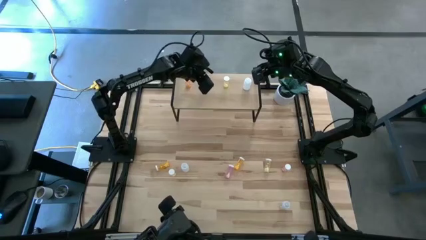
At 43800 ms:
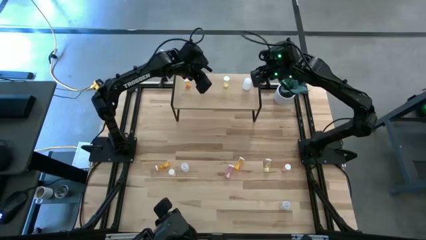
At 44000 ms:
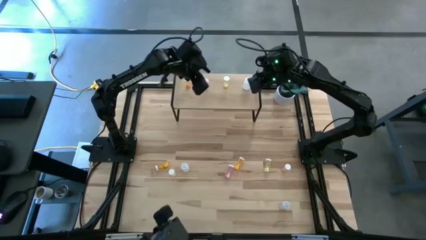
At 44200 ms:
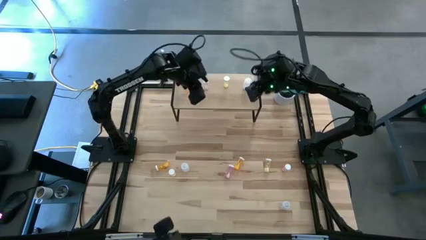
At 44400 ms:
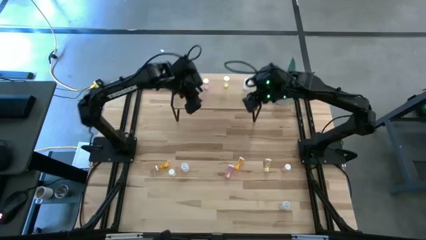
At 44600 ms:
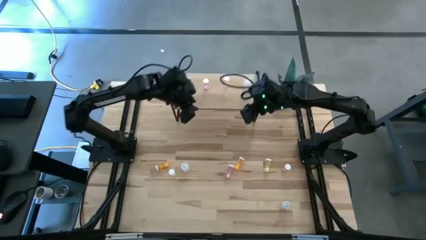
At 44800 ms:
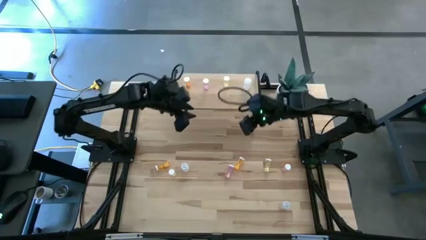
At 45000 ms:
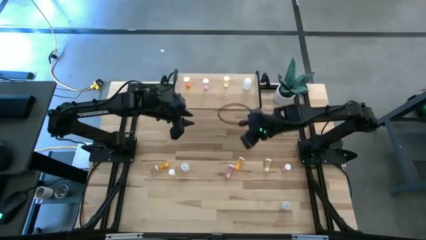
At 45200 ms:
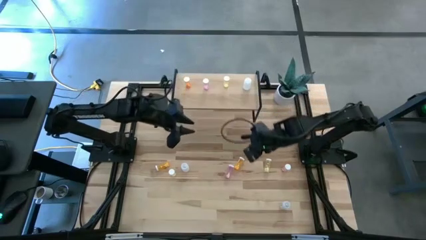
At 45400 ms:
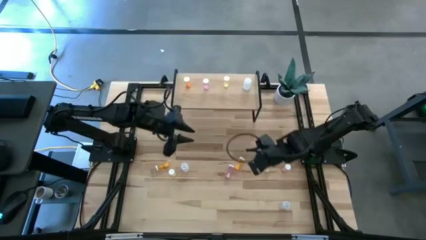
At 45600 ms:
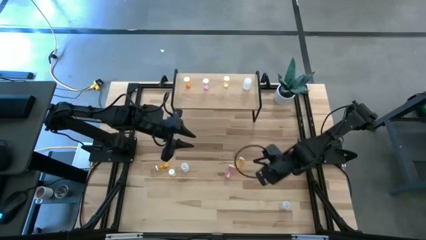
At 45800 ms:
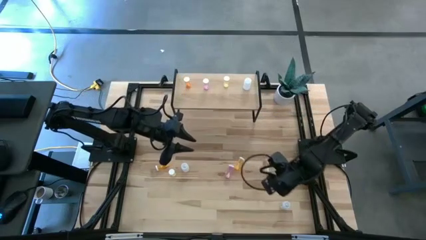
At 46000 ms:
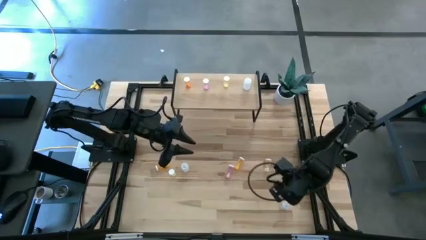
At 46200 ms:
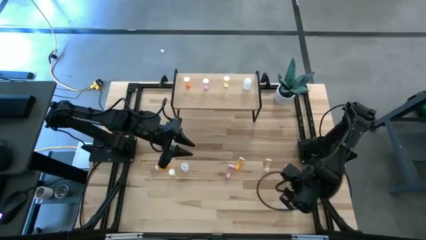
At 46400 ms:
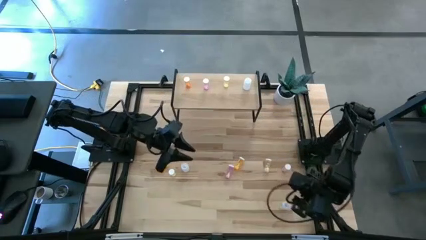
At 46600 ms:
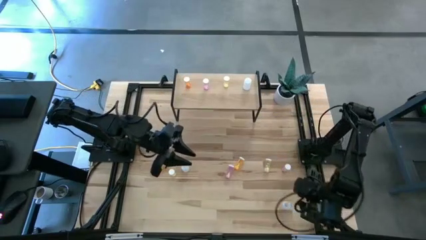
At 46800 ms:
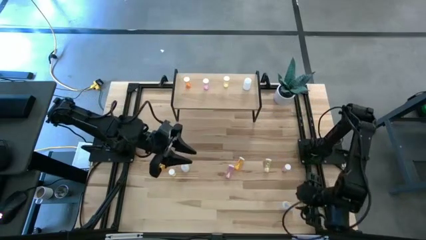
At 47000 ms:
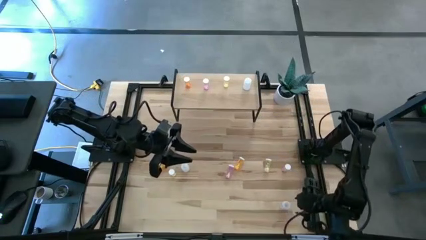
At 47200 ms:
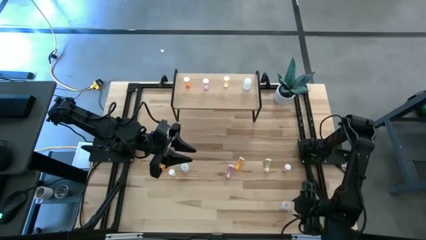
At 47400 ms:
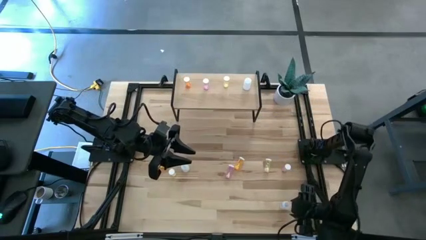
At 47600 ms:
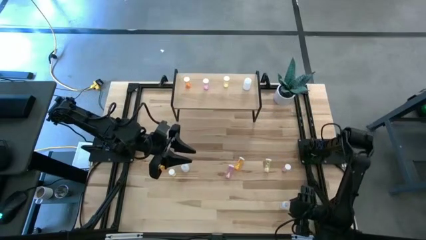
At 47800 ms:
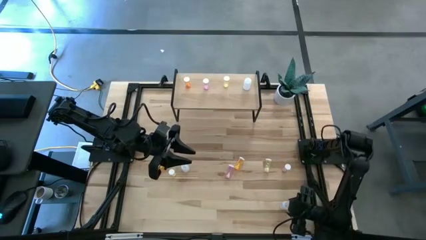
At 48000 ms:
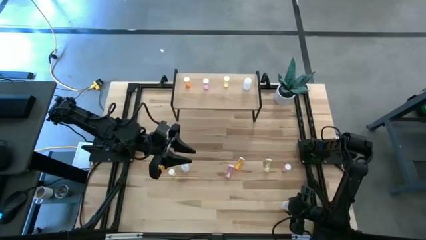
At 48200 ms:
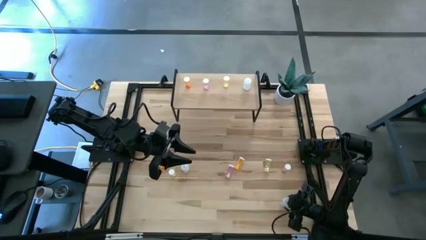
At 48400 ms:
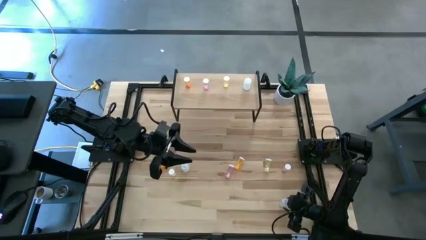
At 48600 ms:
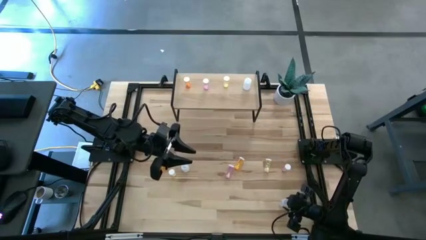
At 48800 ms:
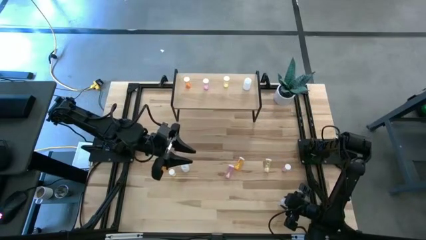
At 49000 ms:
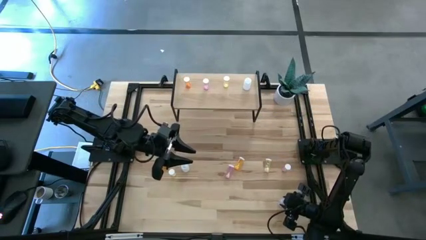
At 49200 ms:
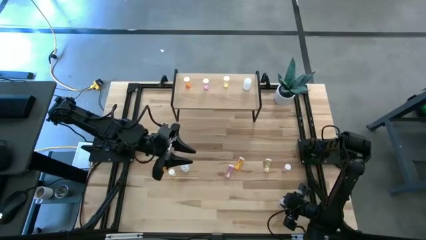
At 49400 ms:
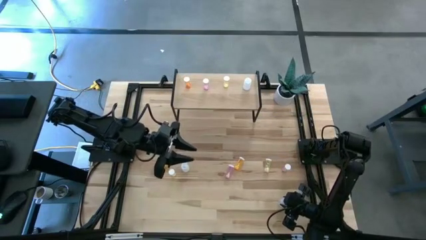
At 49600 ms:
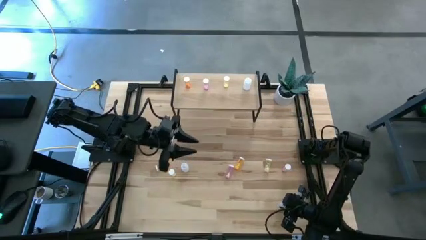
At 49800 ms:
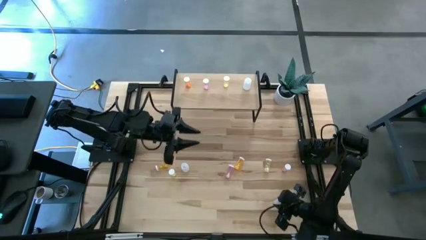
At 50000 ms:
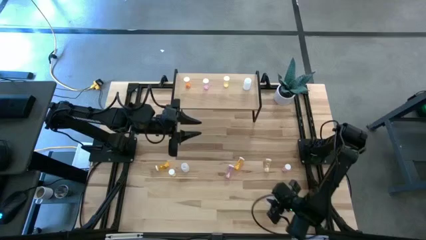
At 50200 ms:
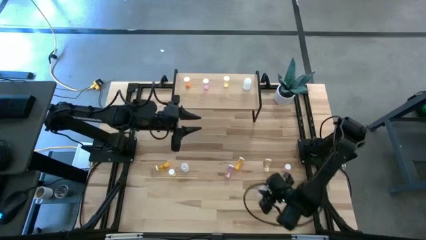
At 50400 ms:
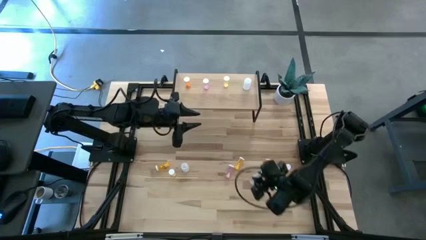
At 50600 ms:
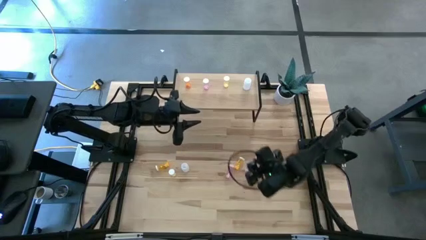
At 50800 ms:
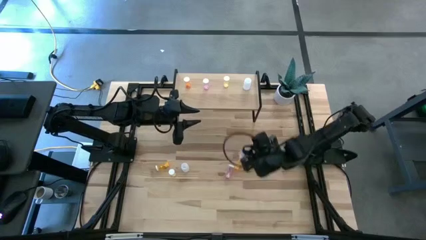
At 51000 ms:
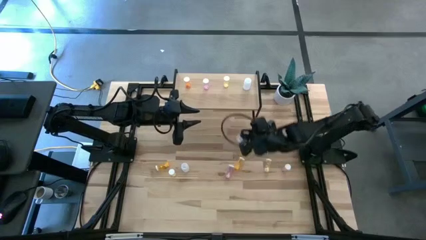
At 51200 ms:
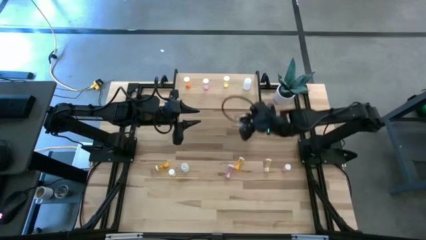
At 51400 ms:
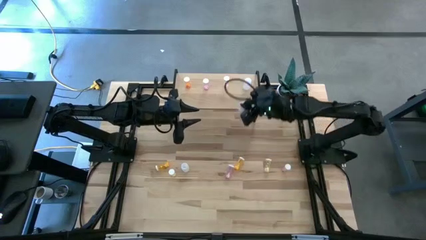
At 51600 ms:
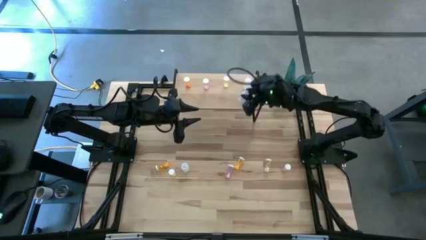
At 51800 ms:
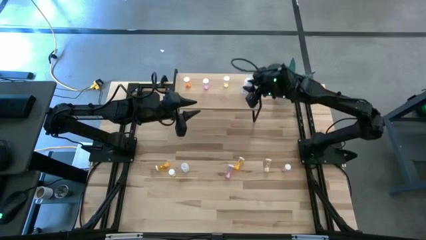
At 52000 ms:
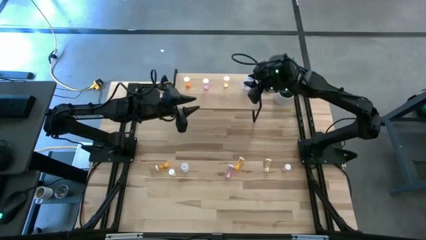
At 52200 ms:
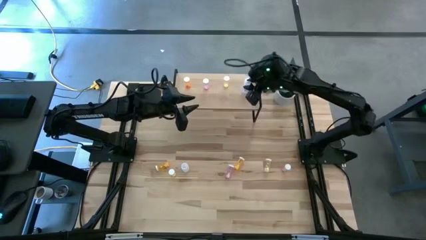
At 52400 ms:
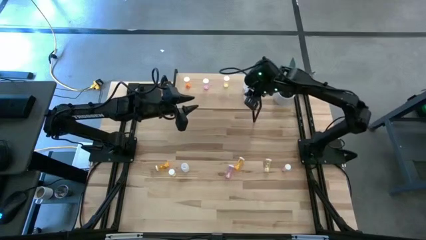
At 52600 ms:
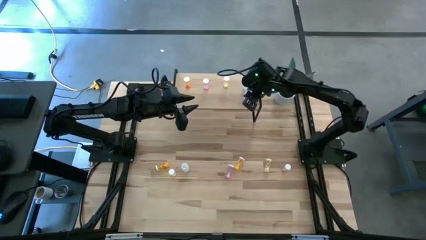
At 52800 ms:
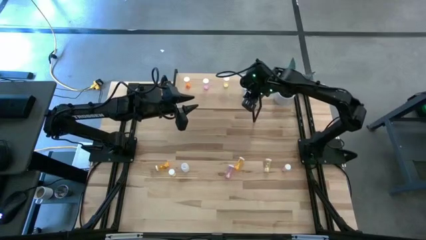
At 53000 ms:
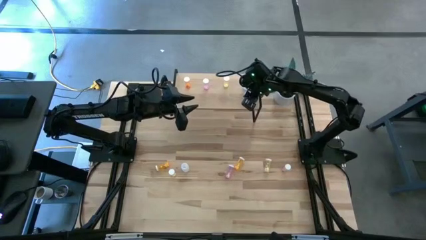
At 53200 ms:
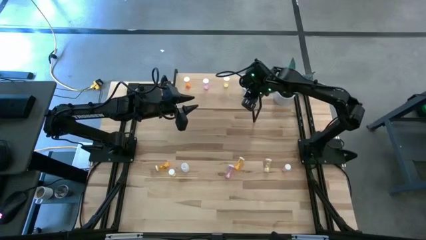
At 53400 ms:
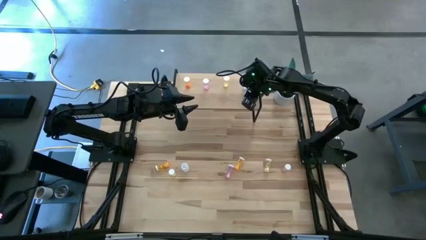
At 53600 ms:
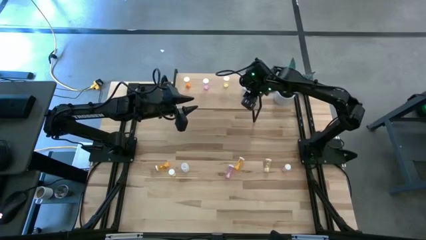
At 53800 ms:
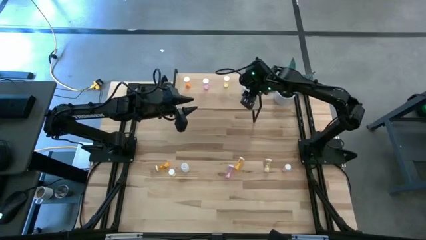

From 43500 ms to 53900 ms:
Task: Pick and place medicine bottles onto shelf by color
Put the right white pill bottle on the shelf aligned with the other white pill bottle
